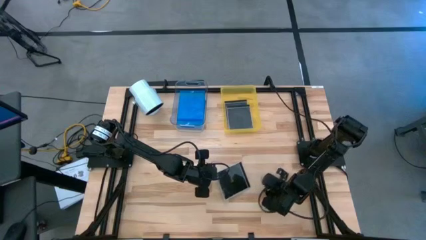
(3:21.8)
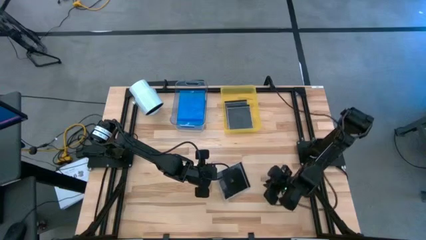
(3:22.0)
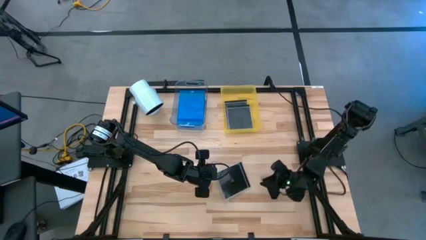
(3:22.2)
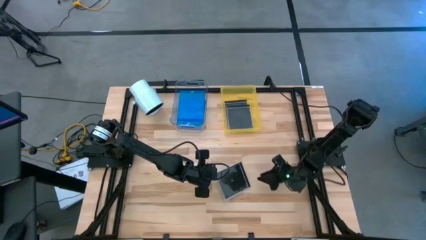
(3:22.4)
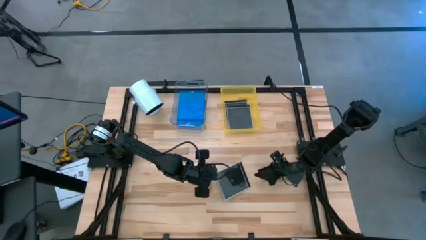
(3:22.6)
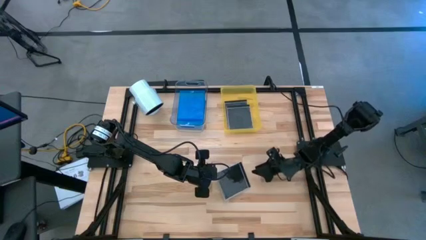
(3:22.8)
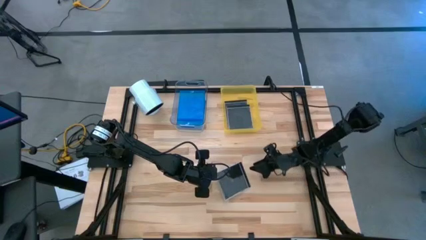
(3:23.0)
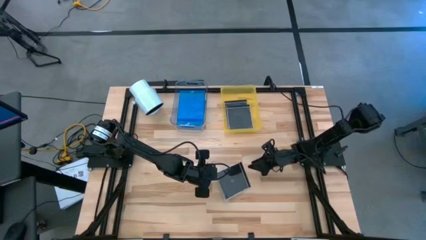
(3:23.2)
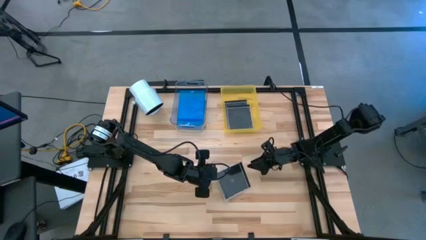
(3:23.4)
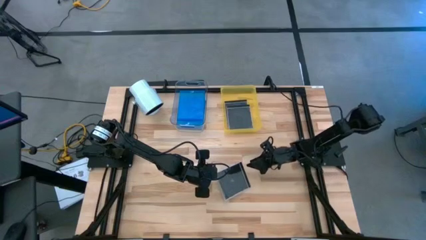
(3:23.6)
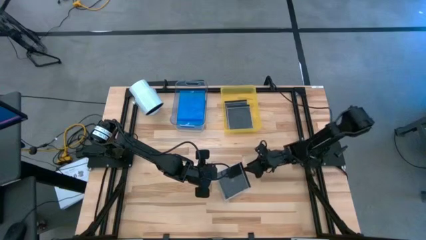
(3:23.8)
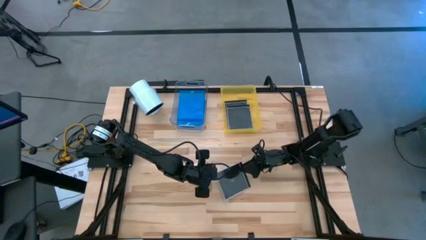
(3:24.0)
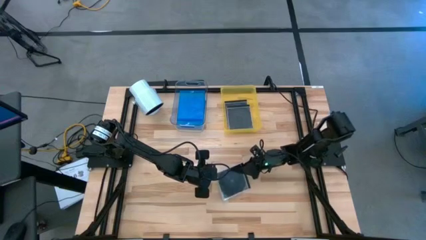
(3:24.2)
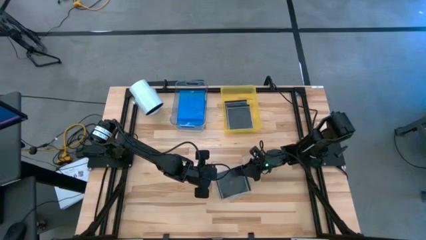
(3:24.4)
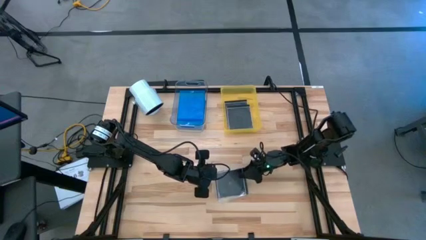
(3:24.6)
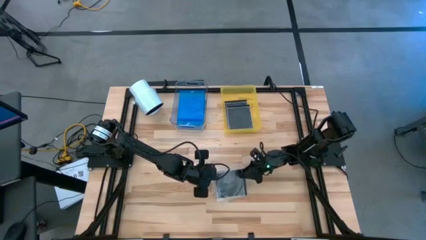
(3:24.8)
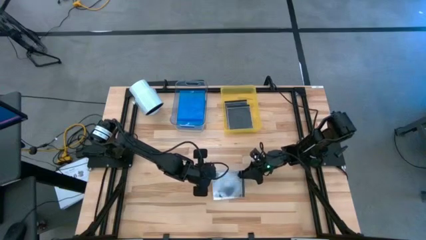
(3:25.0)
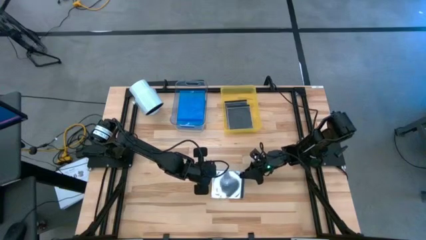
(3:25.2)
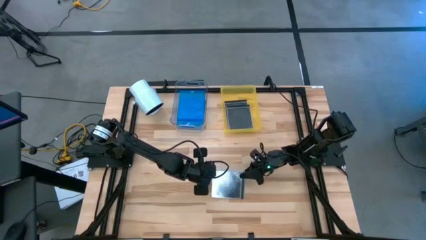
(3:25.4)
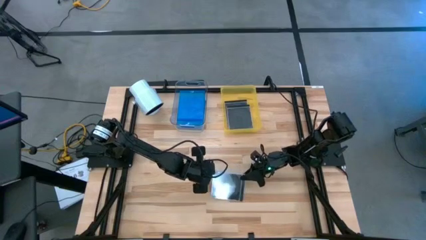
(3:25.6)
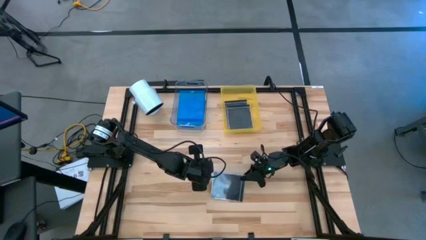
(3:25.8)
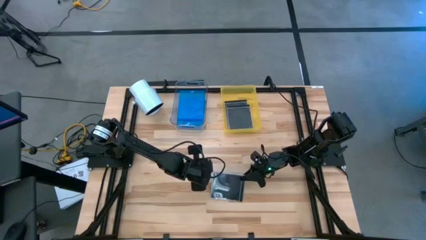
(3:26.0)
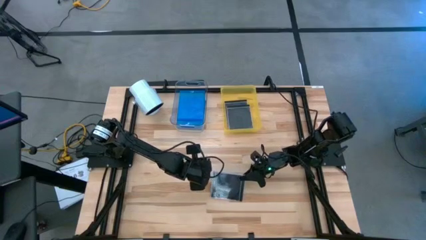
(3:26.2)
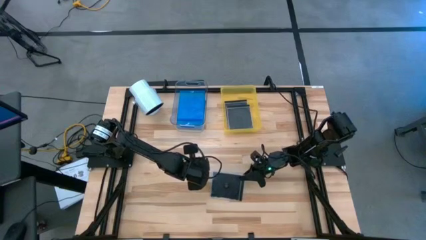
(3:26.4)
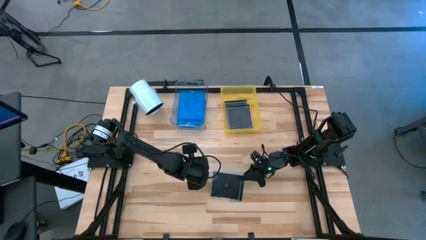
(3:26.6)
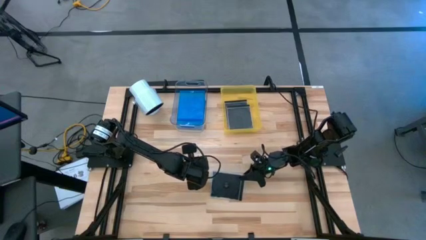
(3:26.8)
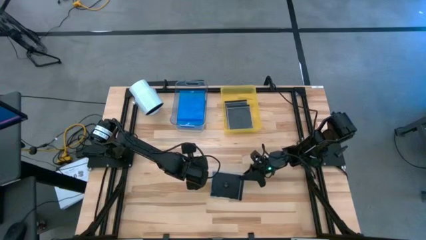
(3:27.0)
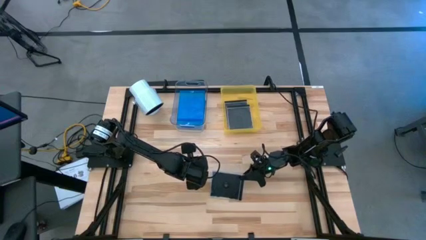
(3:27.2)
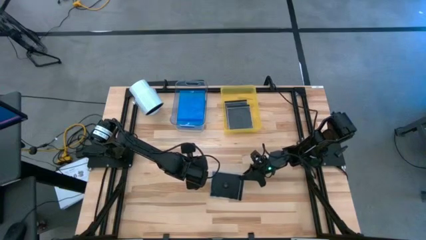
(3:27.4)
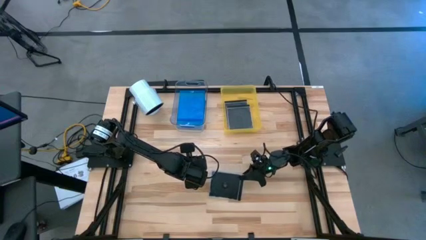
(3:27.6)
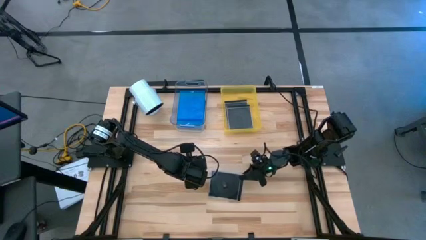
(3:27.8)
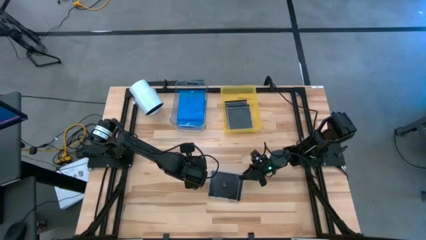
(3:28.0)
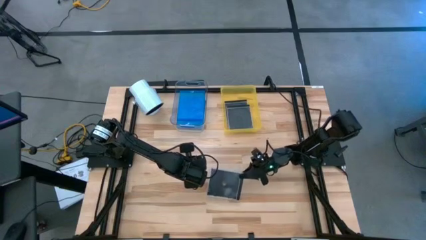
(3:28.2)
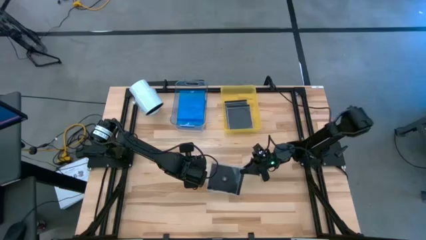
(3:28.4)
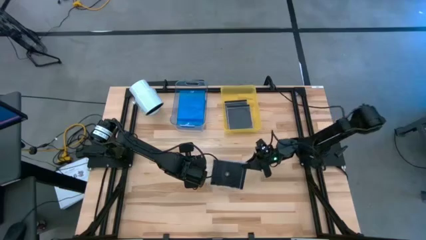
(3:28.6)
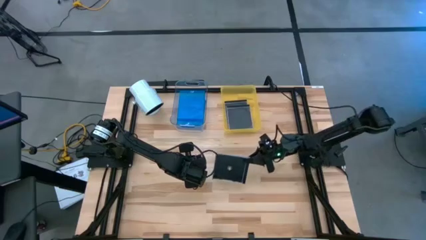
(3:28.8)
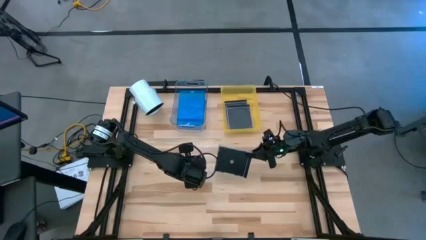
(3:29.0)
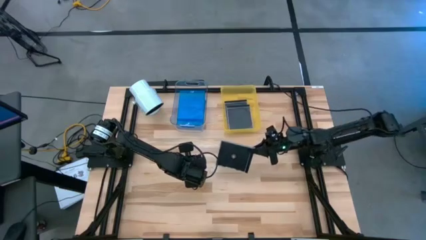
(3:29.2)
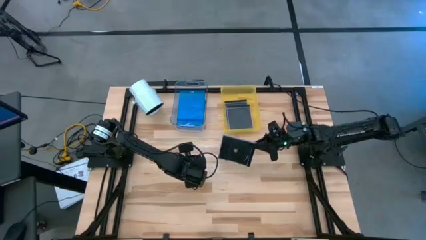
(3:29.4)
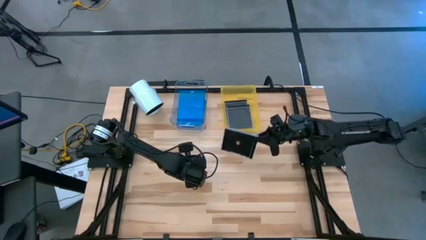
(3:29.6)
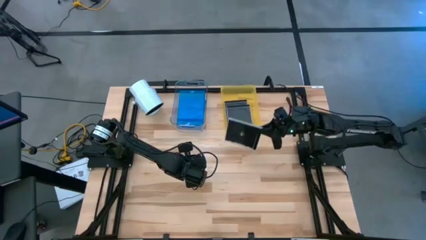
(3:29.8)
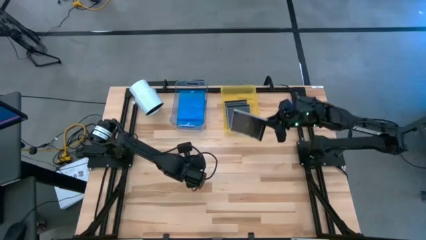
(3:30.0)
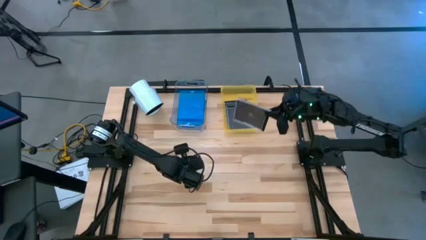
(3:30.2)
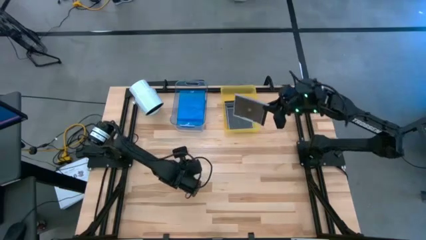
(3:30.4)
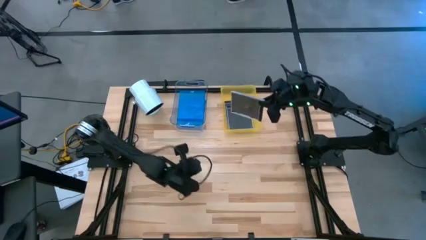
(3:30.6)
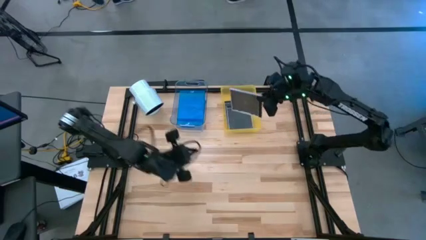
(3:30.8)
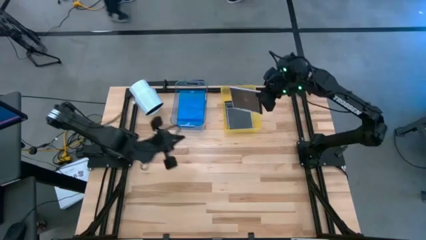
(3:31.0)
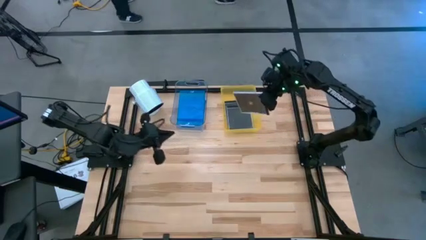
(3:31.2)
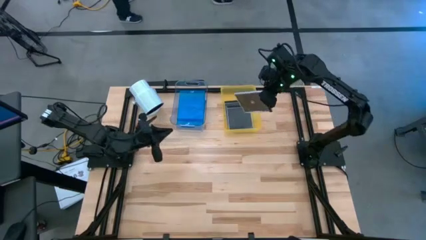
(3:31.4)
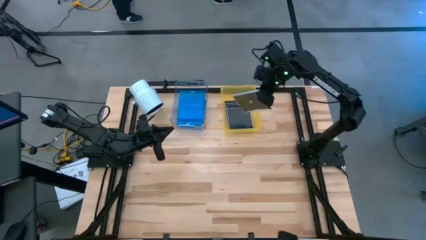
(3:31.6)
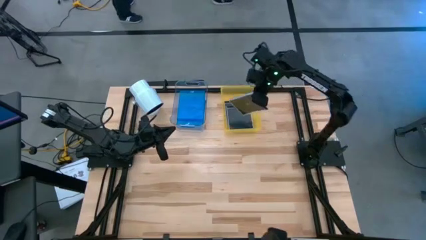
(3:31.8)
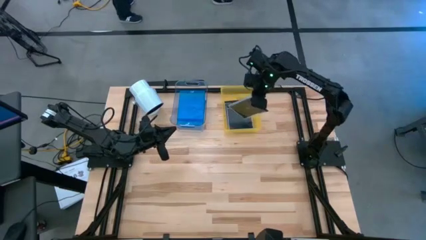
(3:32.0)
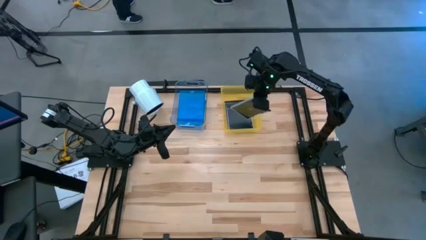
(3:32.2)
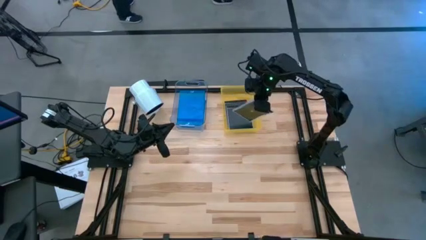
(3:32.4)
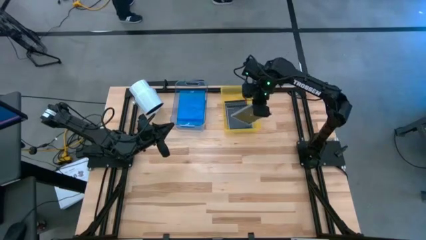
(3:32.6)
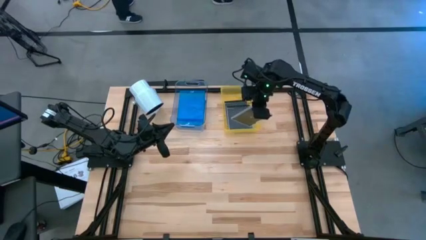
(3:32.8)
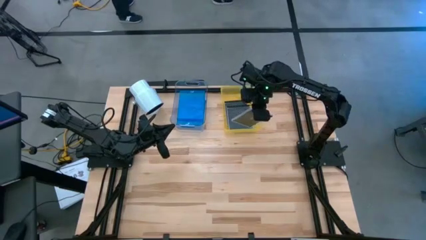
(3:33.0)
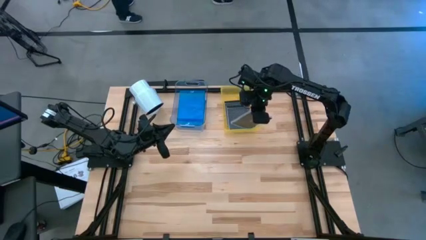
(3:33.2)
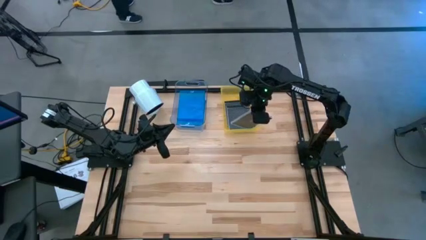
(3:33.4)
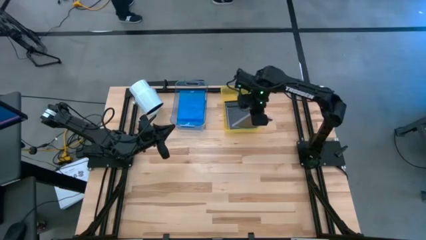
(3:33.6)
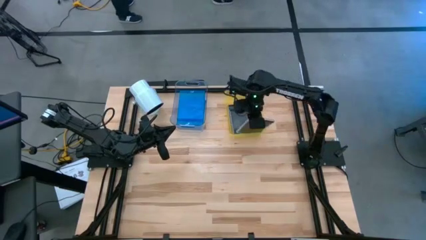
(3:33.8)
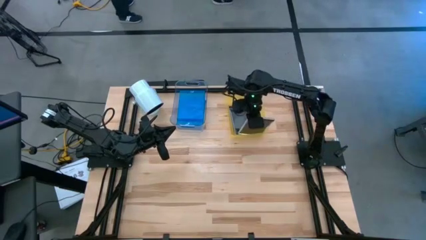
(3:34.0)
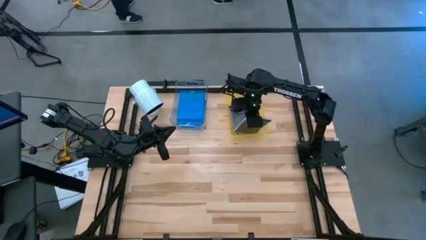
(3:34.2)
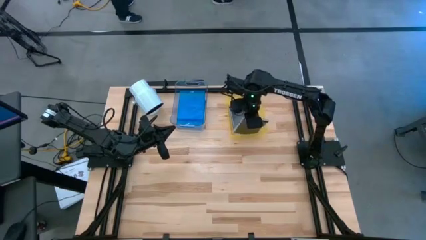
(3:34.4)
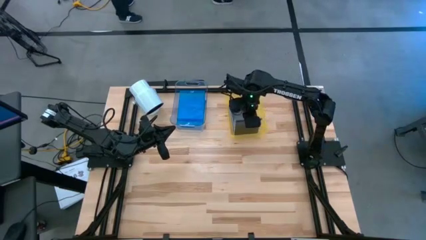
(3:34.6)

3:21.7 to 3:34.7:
Task: Pick & place jewel cases by type
Put the black CD case into the yellow bin
